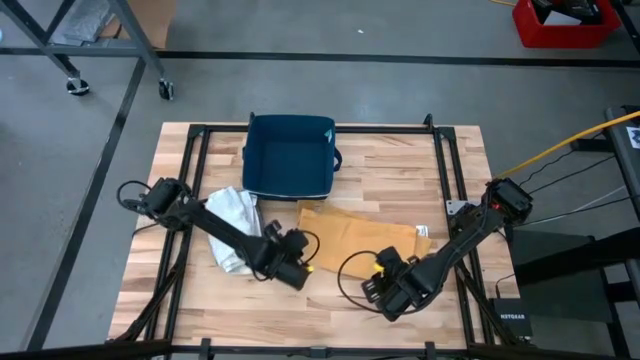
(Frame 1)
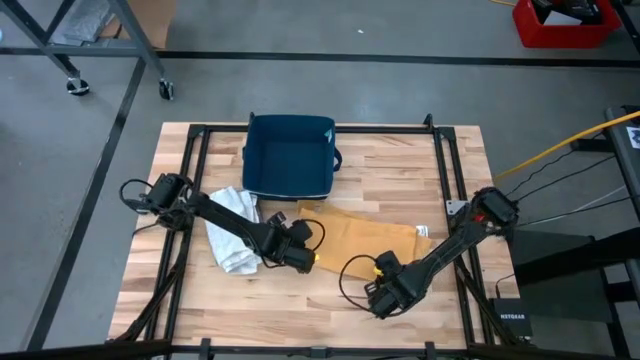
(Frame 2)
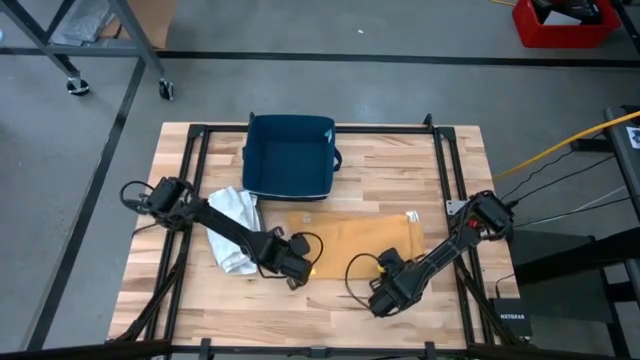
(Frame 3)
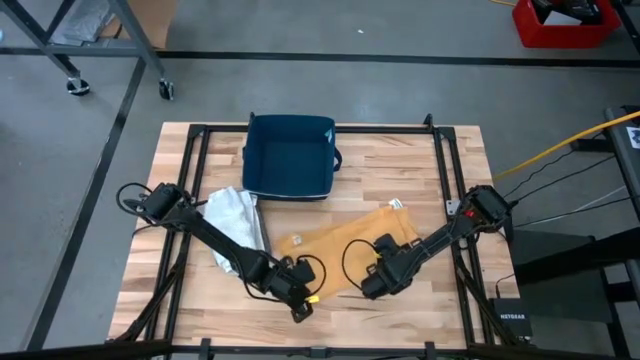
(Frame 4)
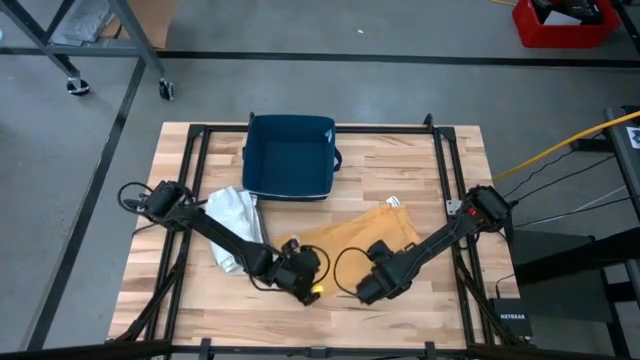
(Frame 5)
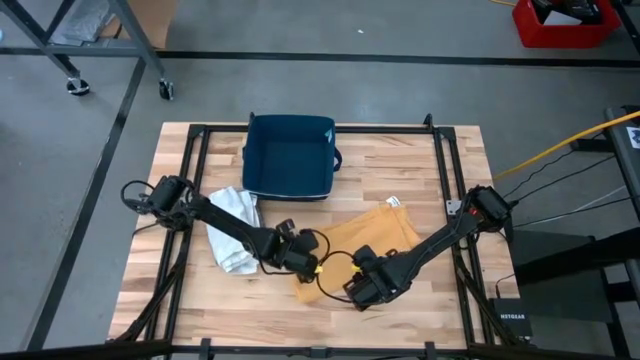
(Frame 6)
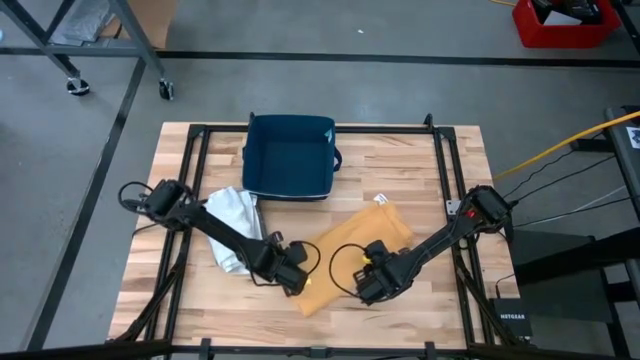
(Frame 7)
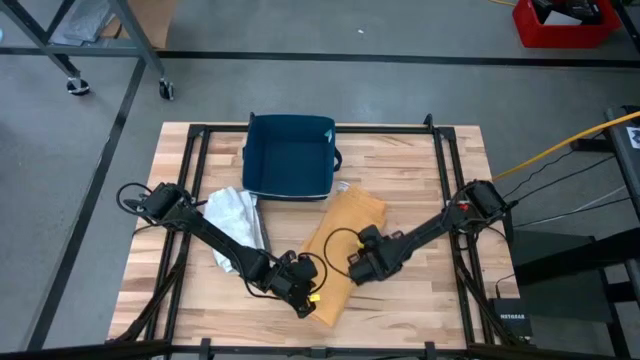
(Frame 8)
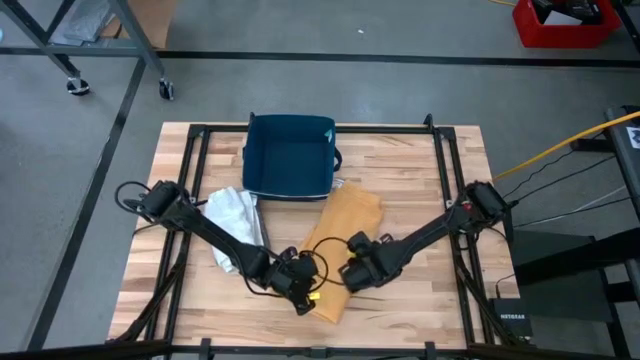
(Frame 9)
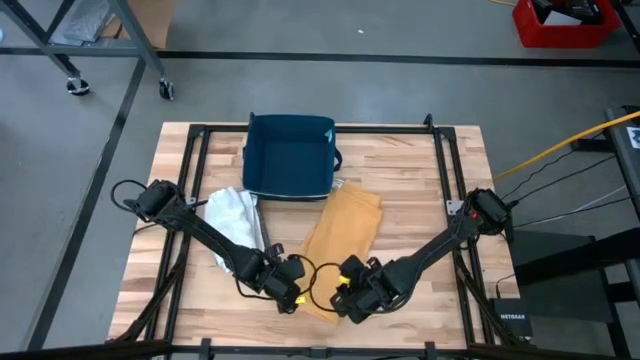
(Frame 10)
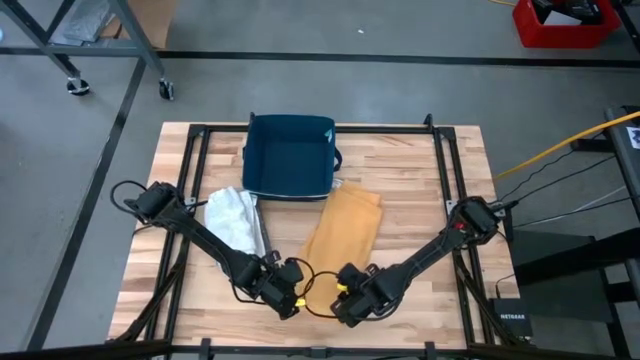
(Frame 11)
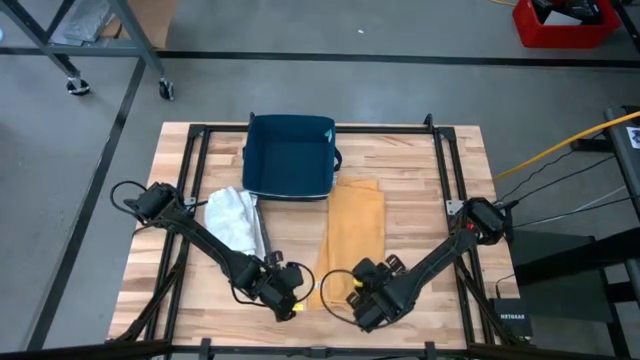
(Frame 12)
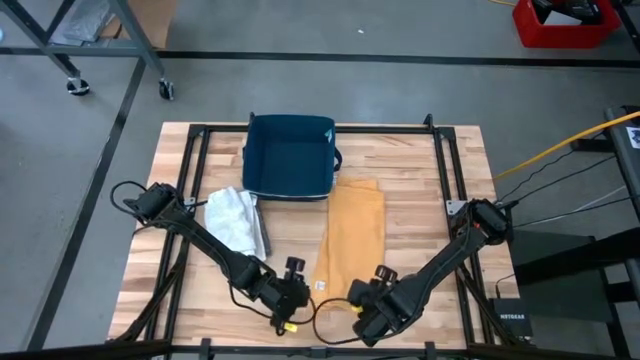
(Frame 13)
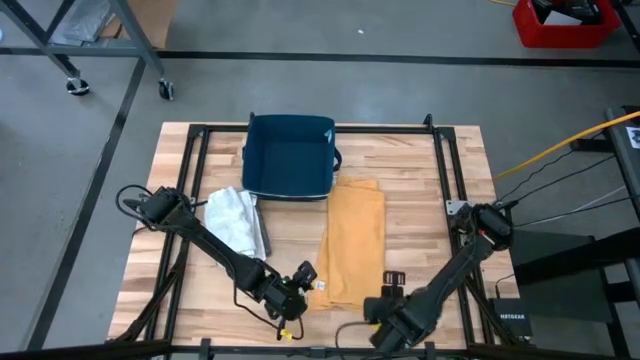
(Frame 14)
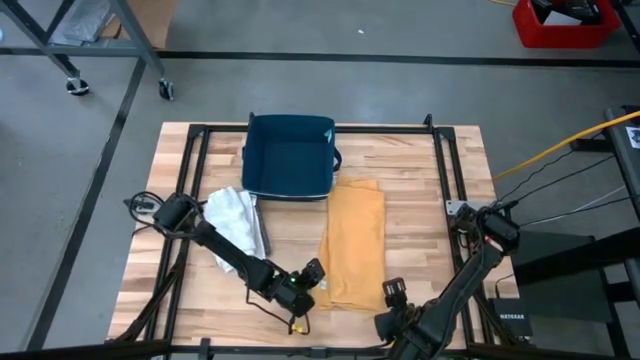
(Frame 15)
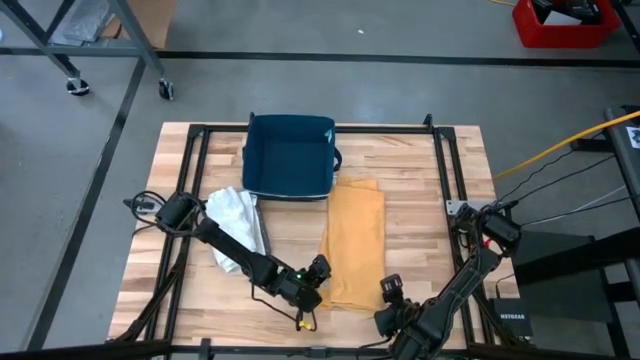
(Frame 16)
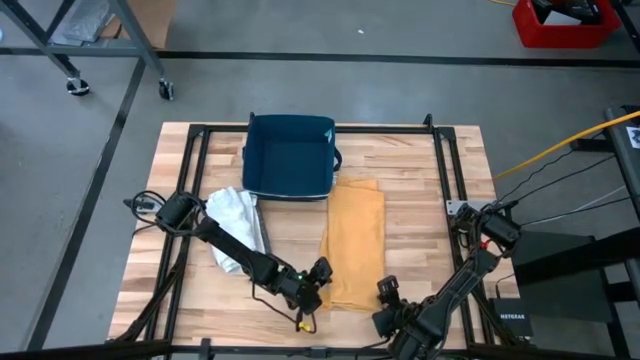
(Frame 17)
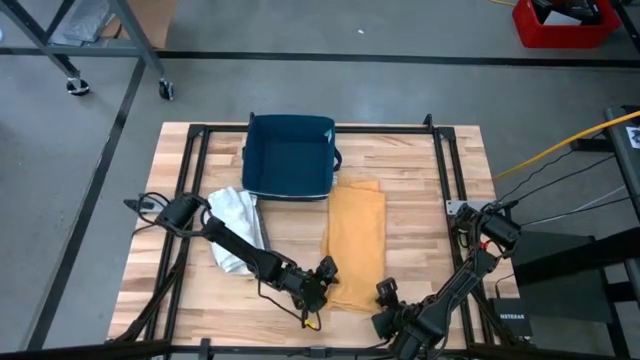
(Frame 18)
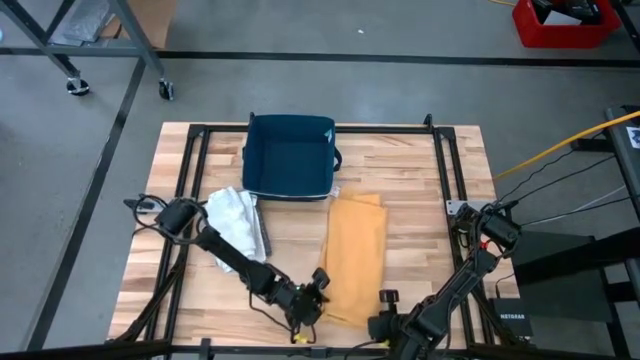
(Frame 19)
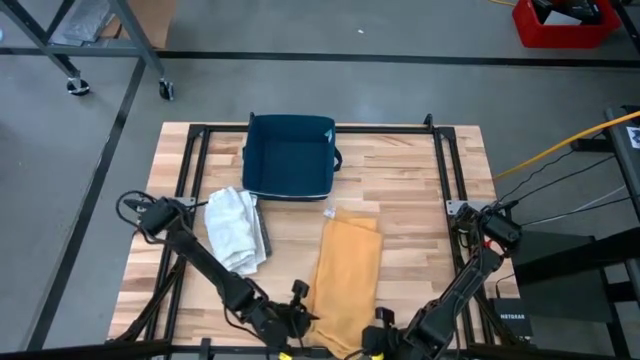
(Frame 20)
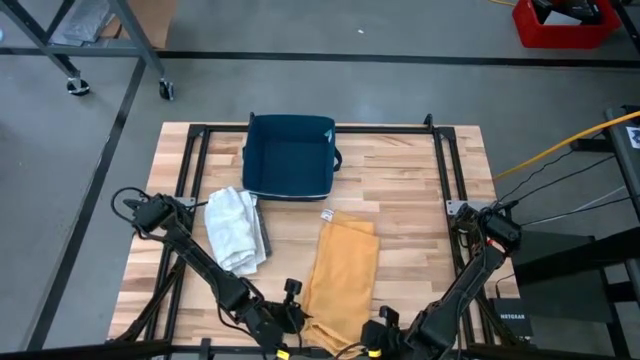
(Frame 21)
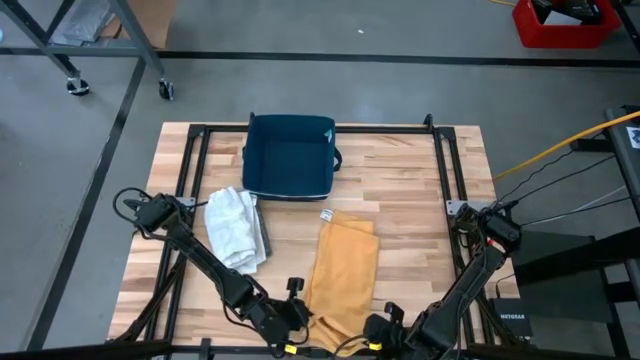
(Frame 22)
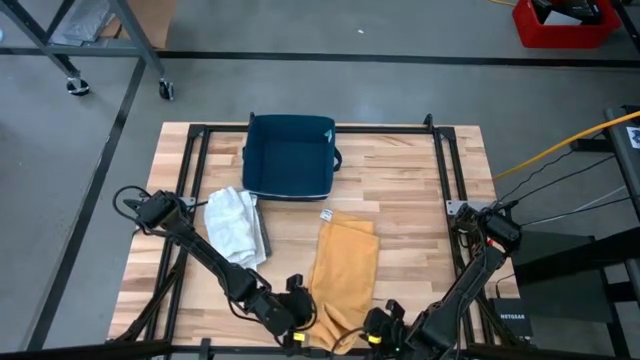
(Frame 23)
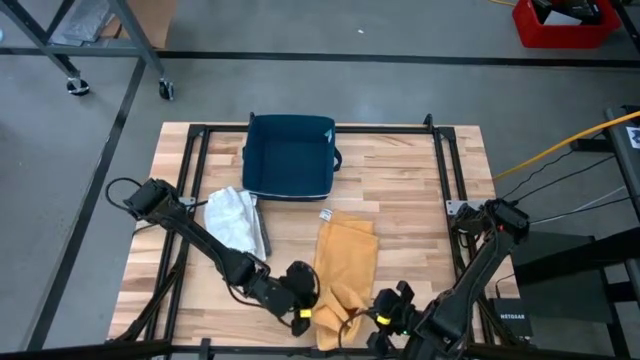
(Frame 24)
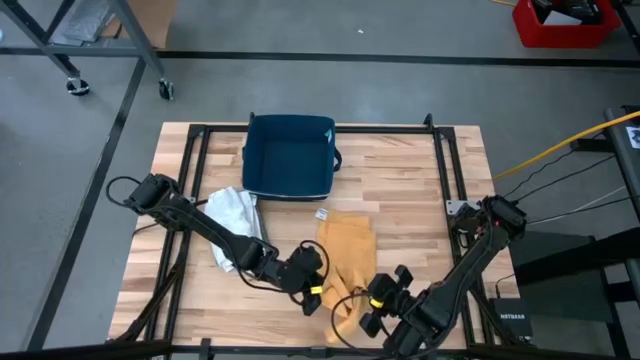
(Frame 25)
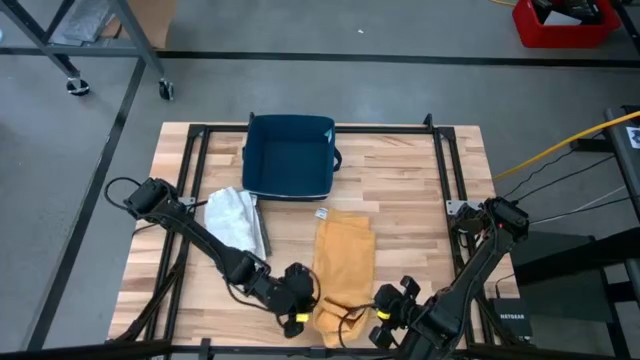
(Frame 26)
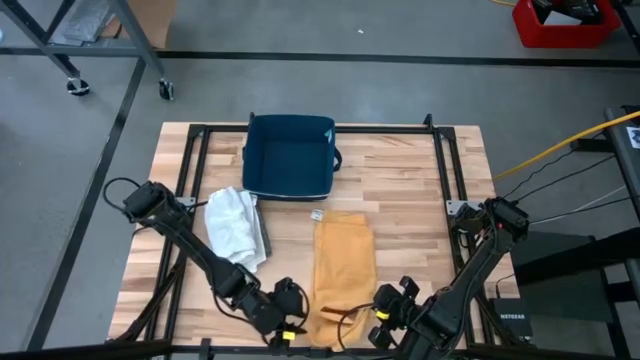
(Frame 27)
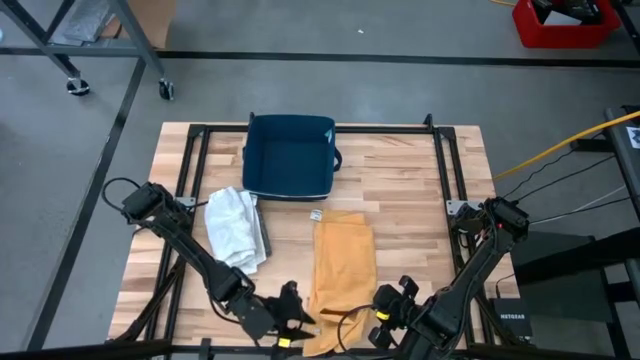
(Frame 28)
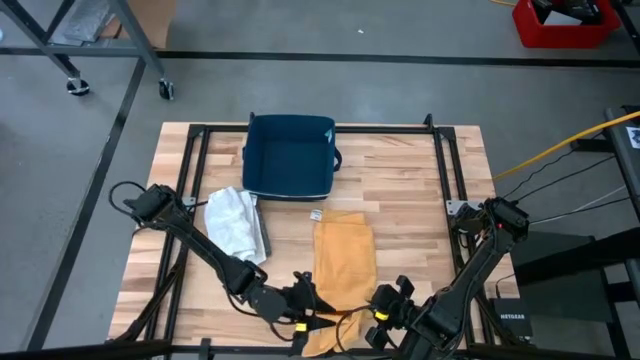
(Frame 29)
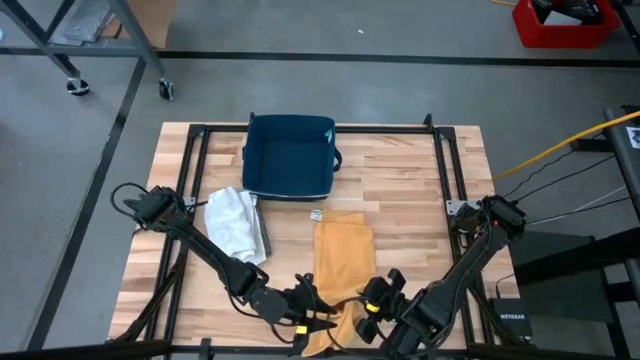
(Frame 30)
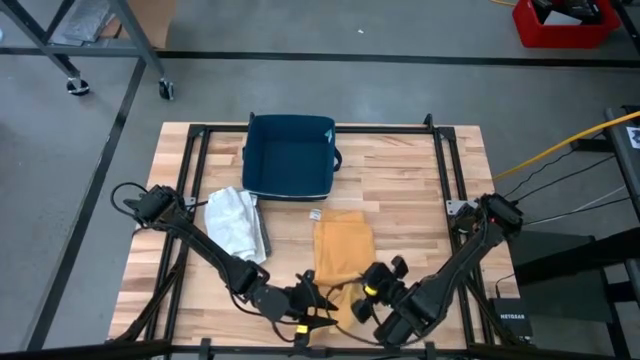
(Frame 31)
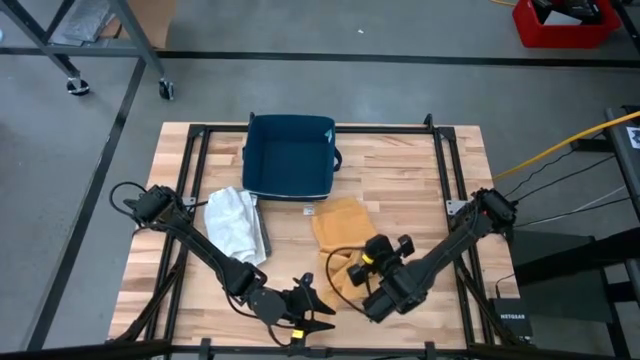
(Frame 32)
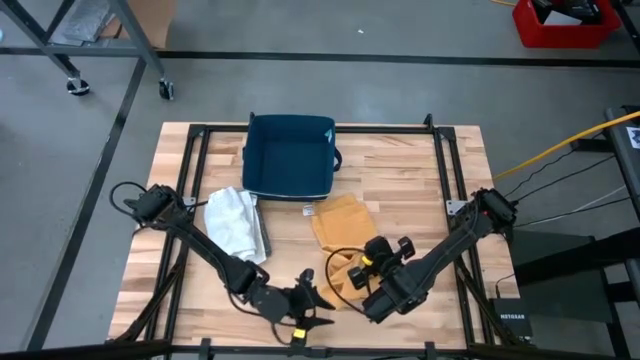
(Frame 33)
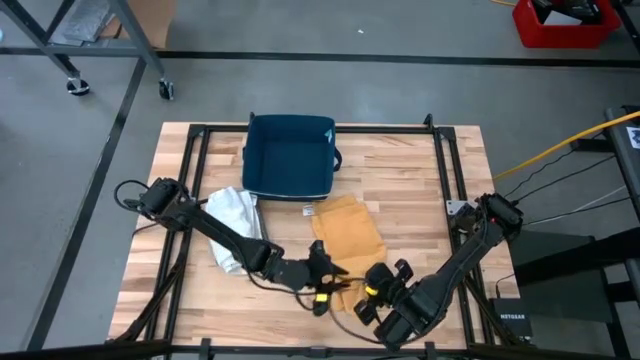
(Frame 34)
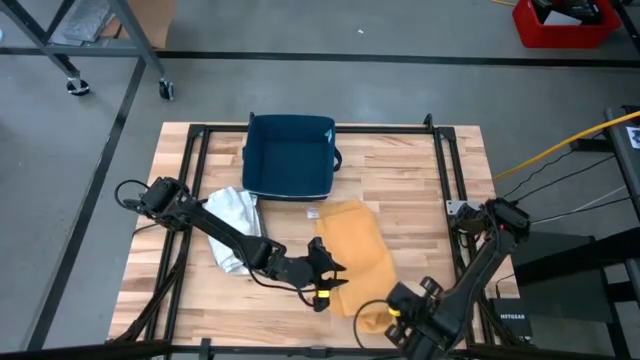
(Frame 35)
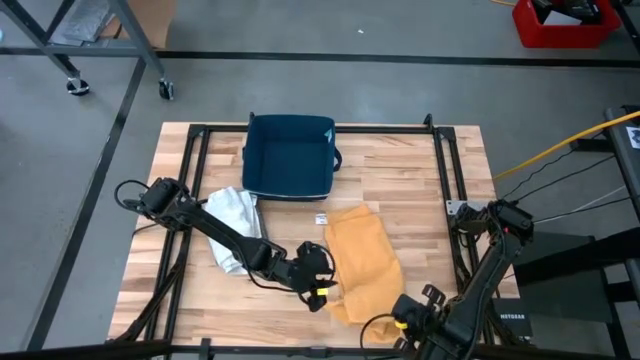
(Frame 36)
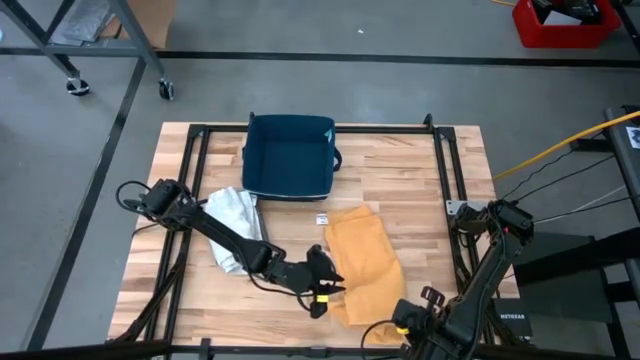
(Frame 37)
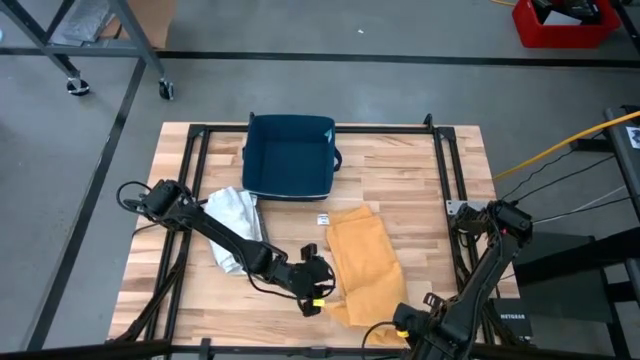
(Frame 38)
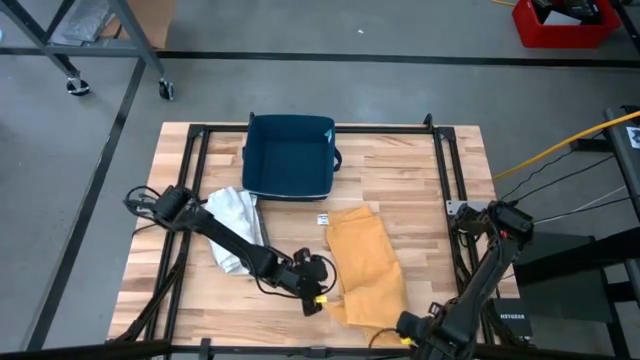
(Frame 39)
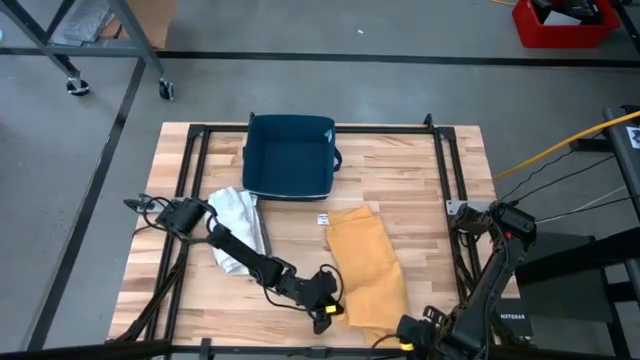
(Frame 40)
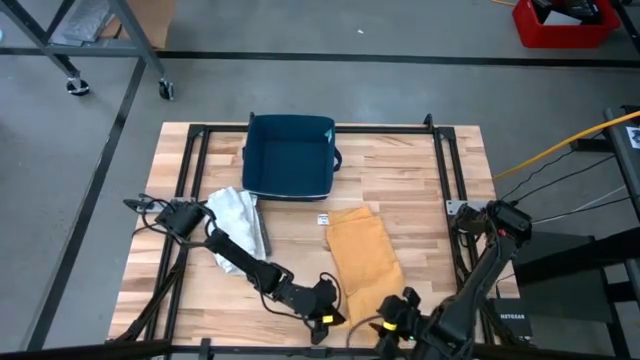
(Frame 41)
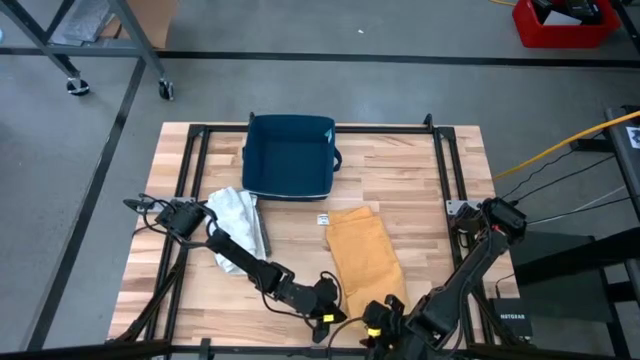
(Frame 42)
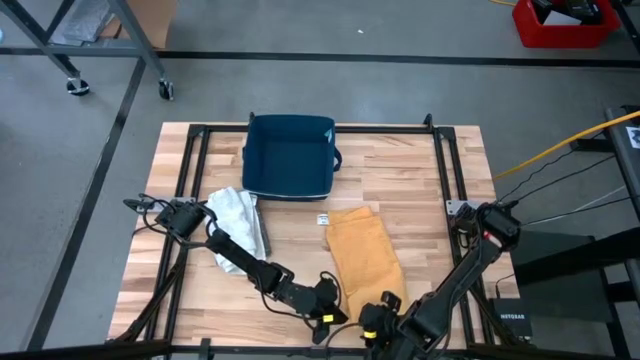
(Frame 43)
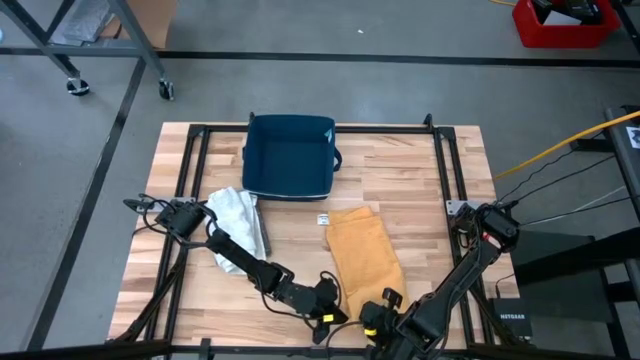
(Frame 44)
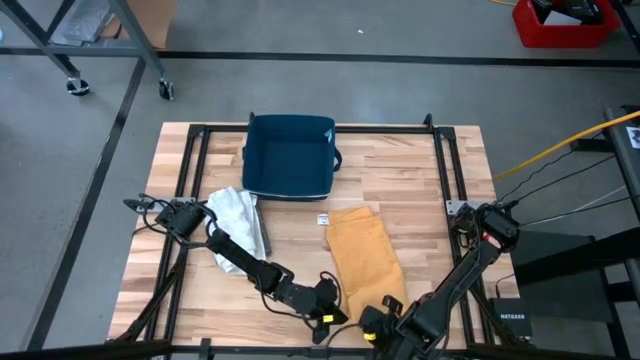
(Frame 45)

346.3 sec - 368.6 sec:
Task: Fold towel
Fold the yellow towel
